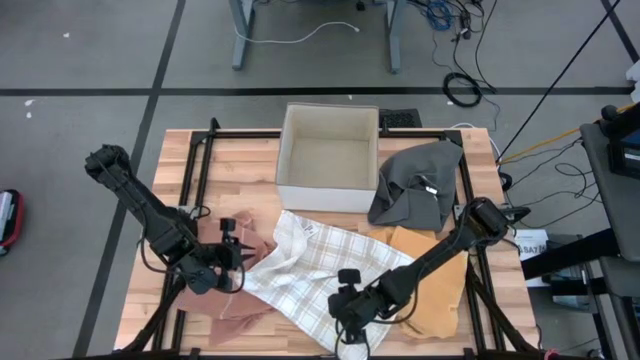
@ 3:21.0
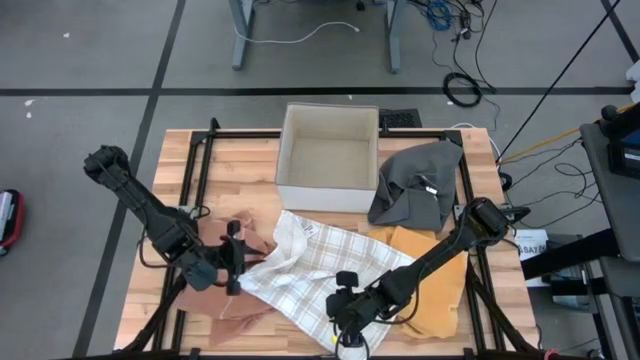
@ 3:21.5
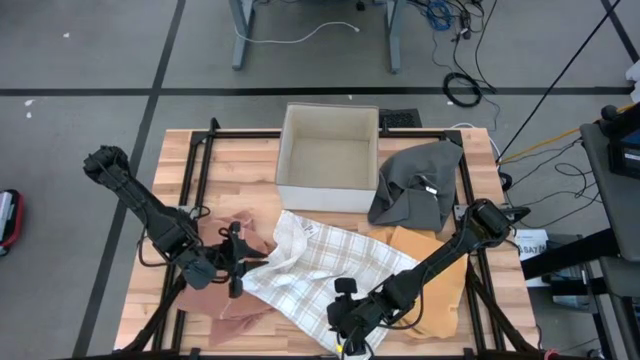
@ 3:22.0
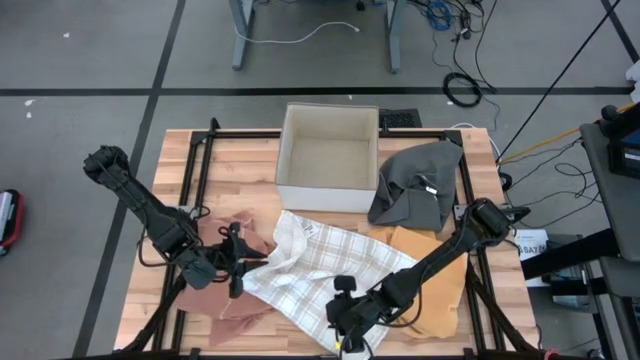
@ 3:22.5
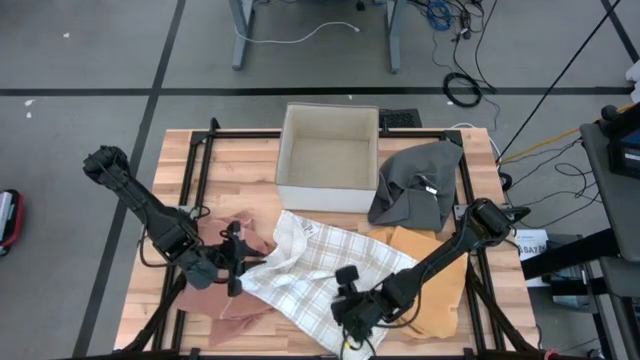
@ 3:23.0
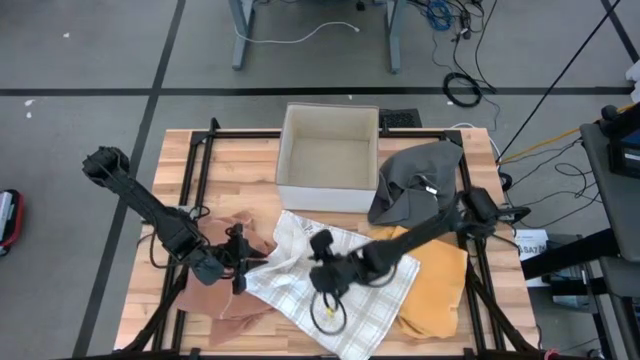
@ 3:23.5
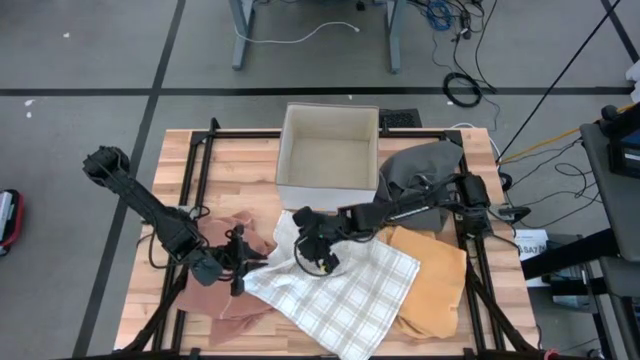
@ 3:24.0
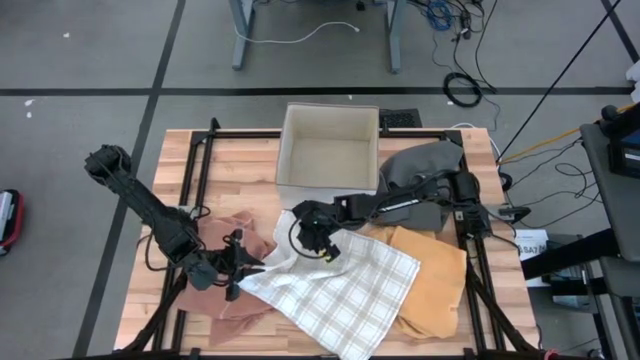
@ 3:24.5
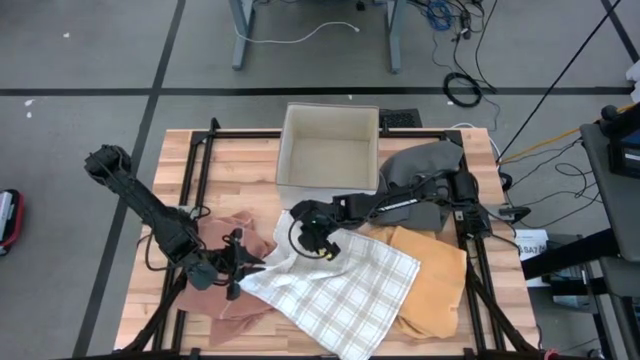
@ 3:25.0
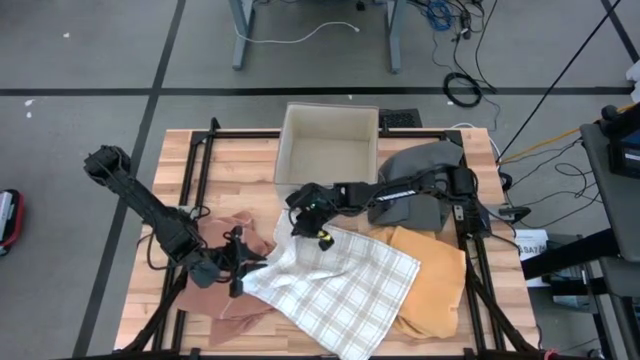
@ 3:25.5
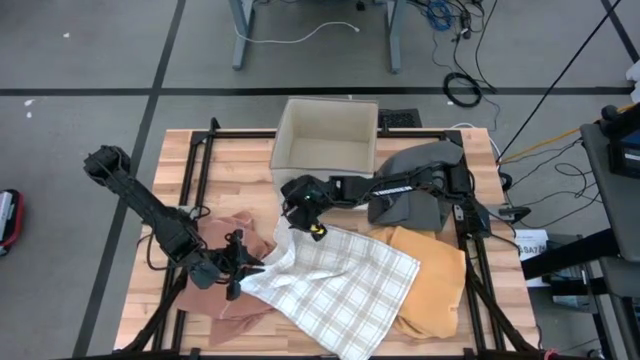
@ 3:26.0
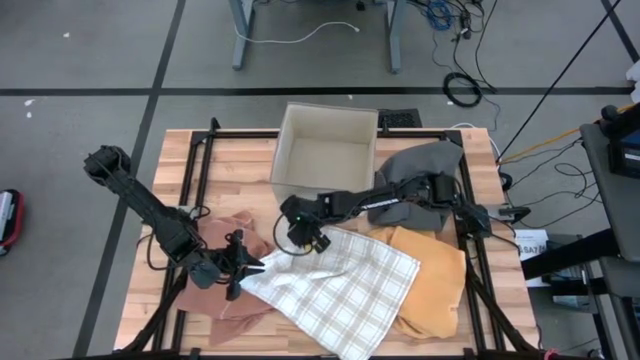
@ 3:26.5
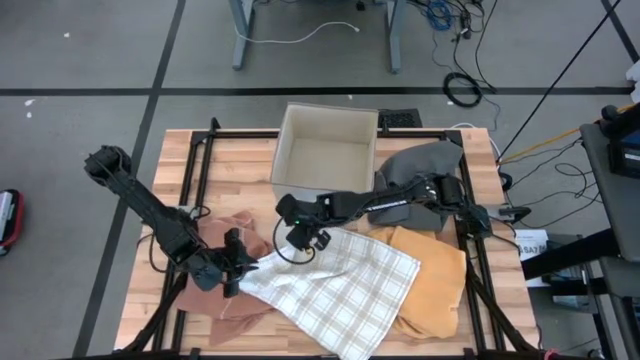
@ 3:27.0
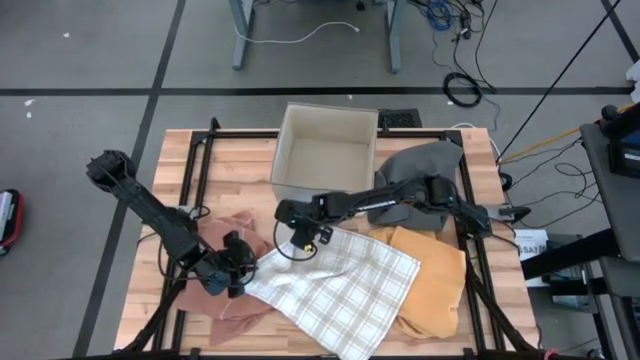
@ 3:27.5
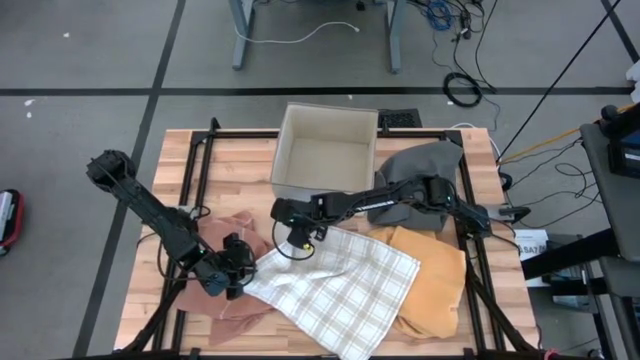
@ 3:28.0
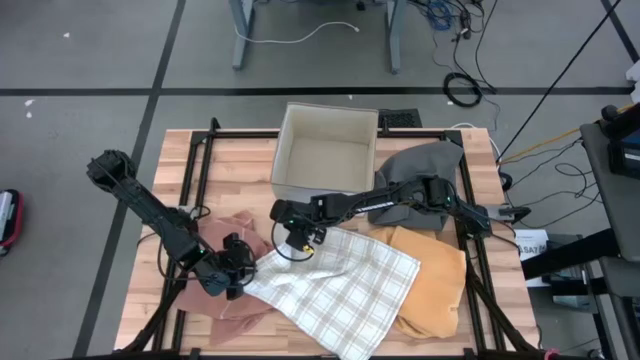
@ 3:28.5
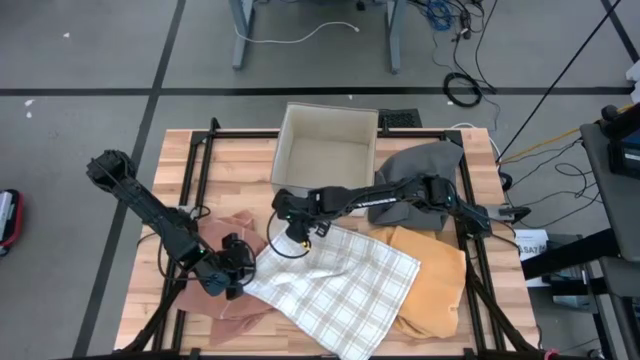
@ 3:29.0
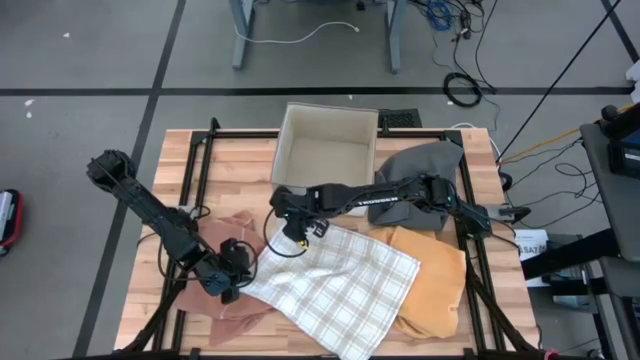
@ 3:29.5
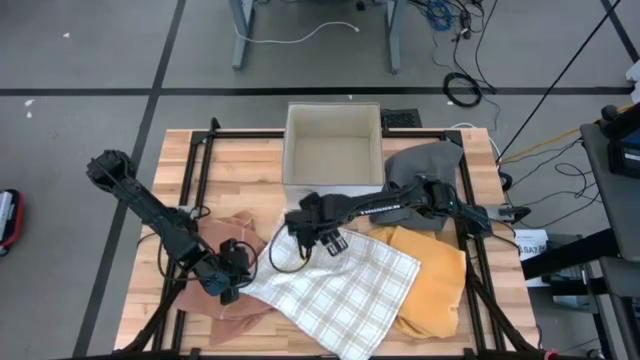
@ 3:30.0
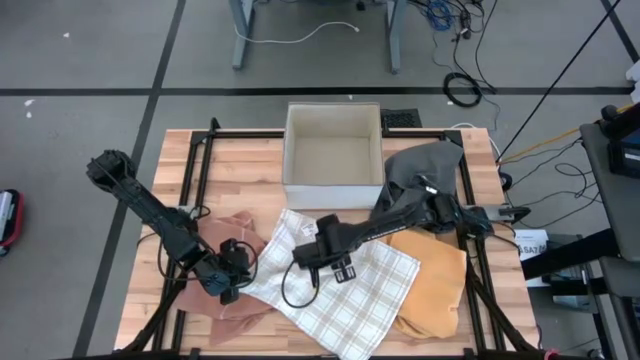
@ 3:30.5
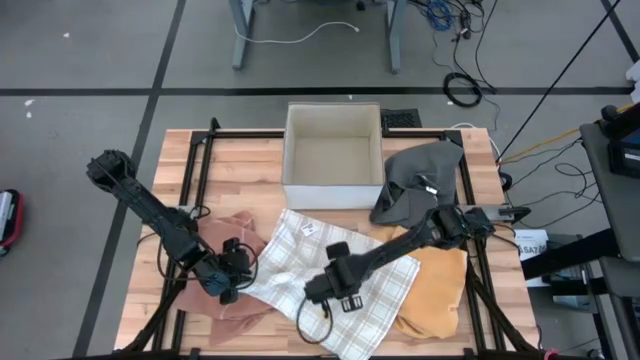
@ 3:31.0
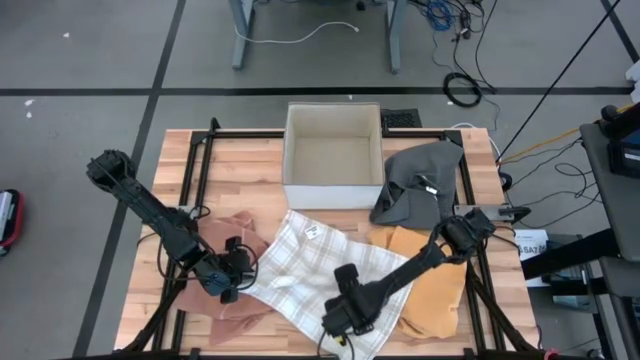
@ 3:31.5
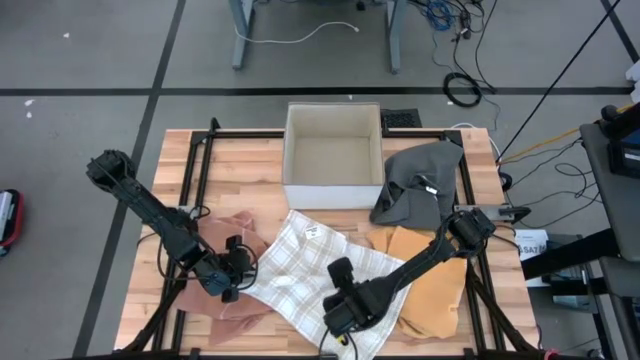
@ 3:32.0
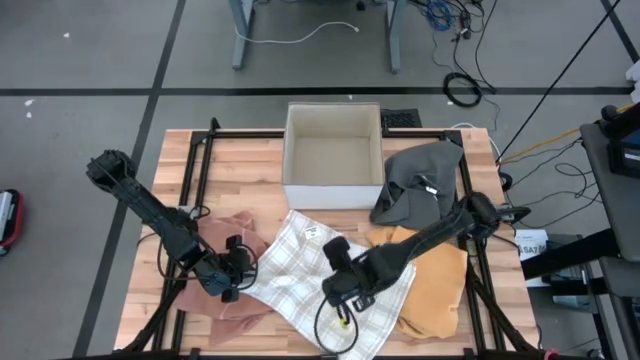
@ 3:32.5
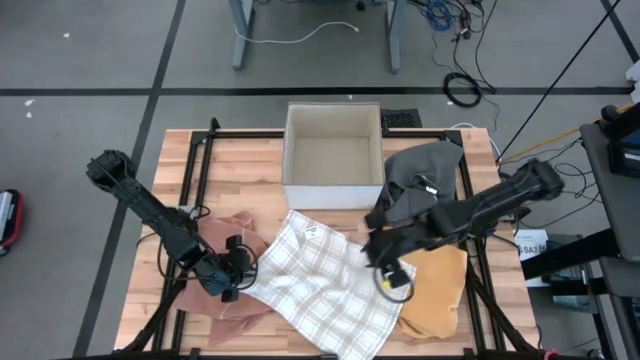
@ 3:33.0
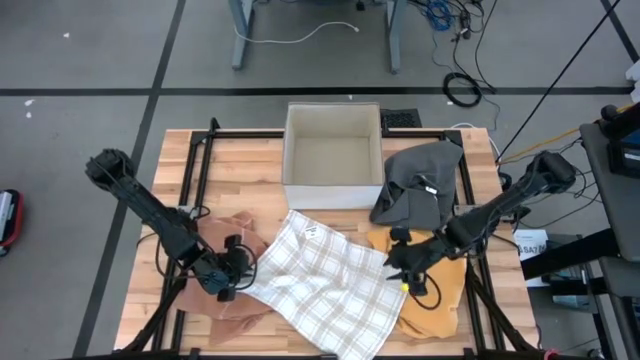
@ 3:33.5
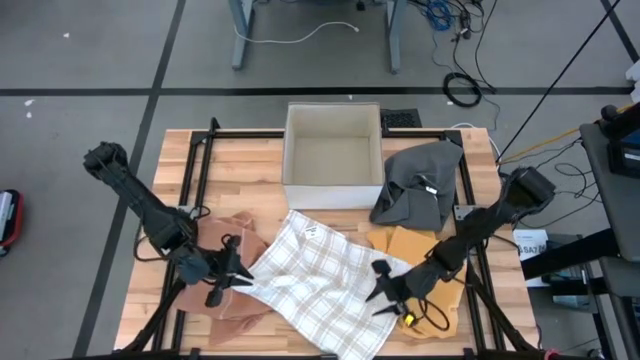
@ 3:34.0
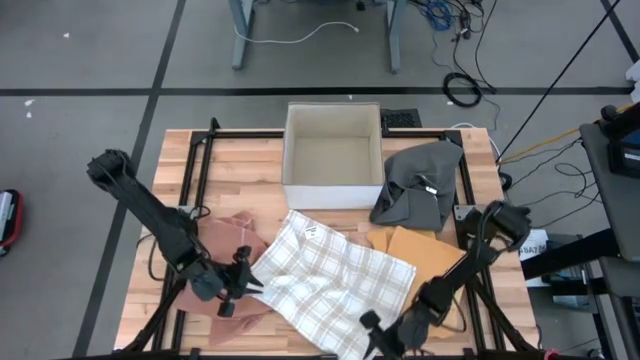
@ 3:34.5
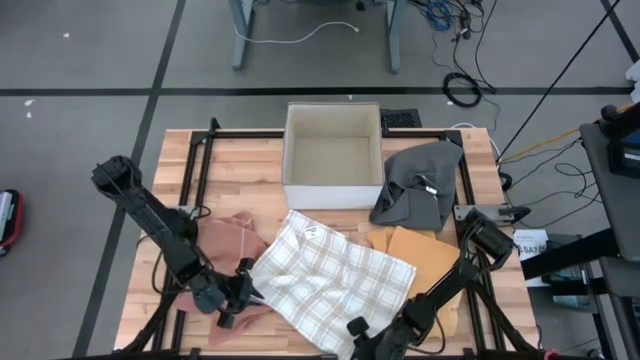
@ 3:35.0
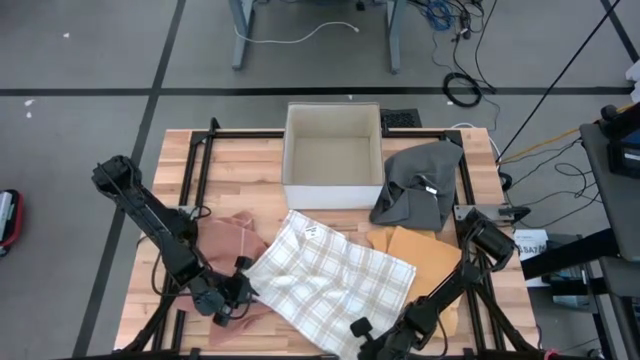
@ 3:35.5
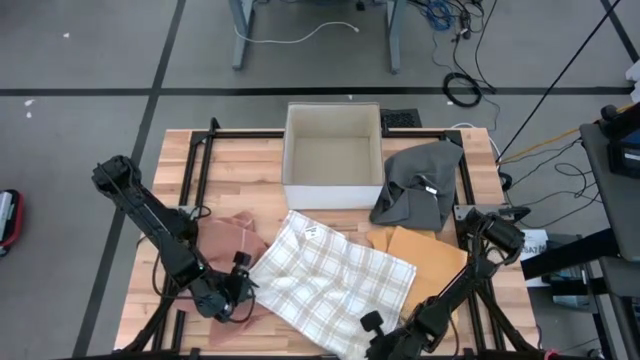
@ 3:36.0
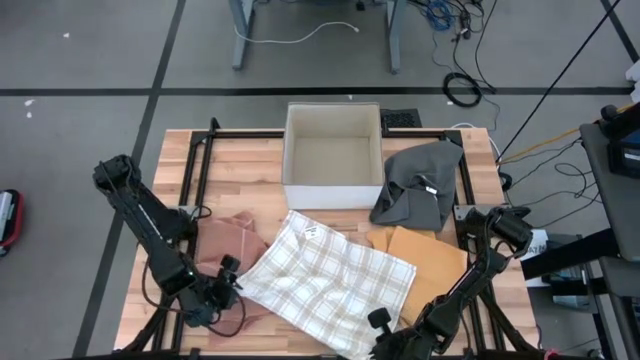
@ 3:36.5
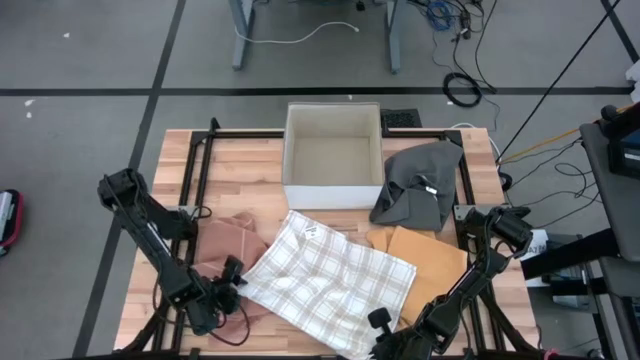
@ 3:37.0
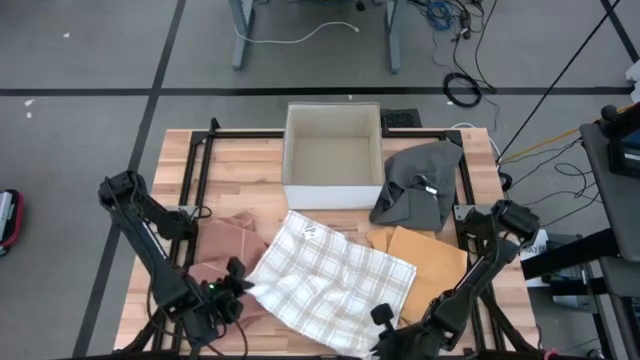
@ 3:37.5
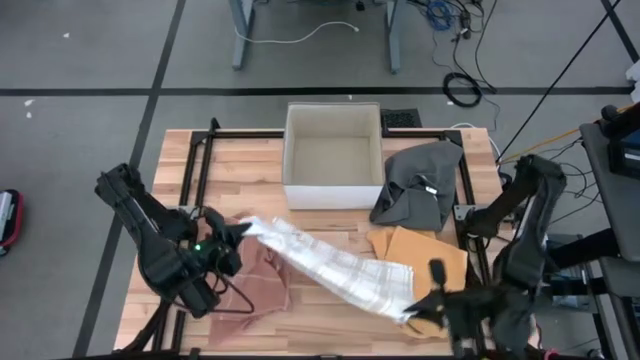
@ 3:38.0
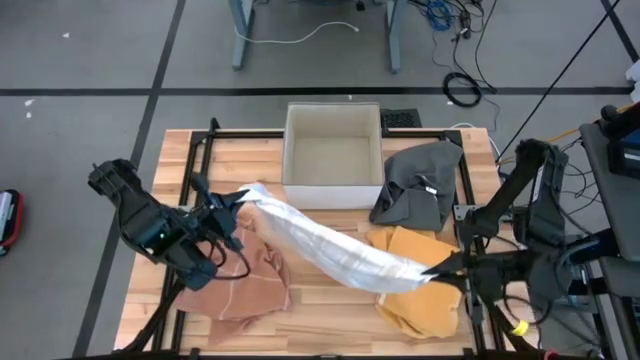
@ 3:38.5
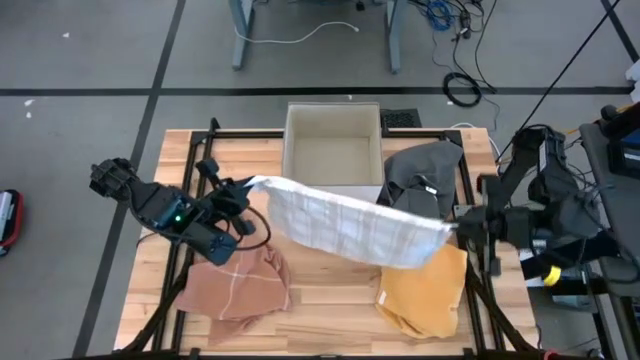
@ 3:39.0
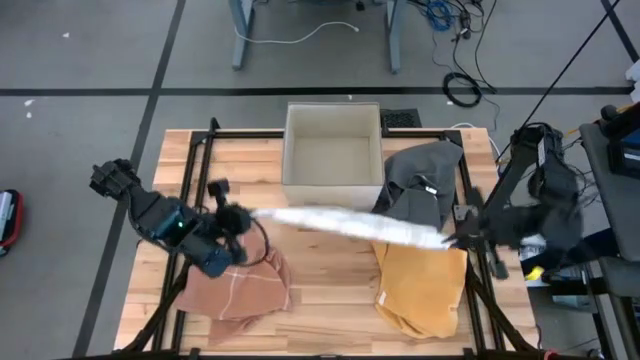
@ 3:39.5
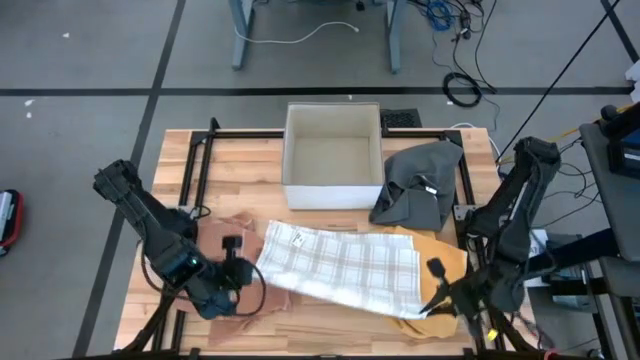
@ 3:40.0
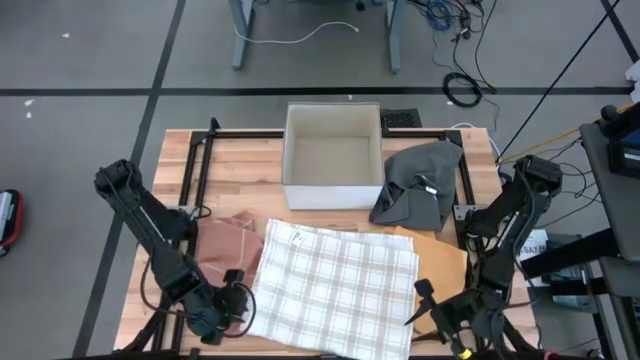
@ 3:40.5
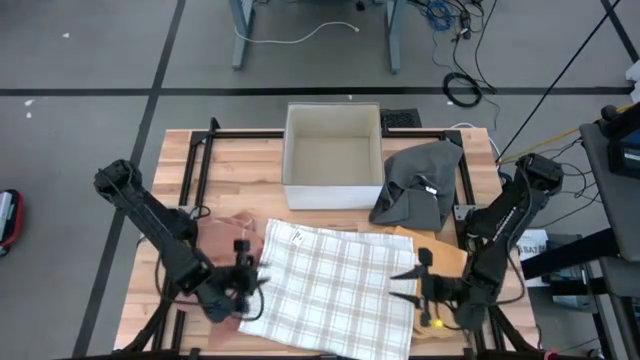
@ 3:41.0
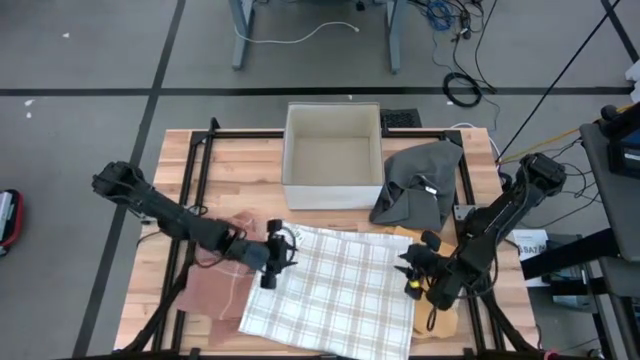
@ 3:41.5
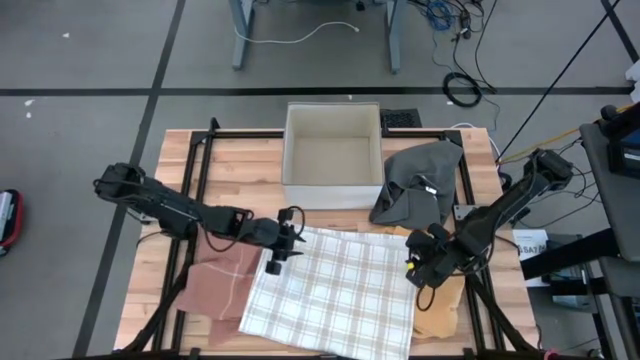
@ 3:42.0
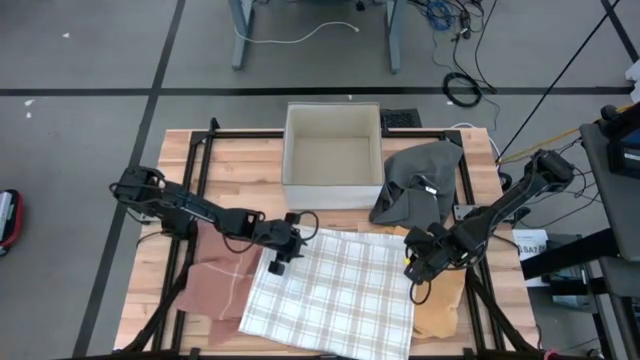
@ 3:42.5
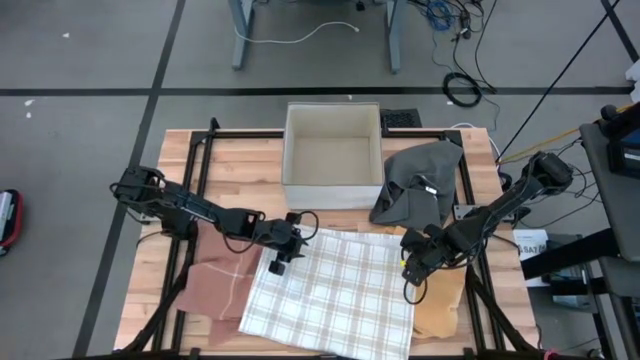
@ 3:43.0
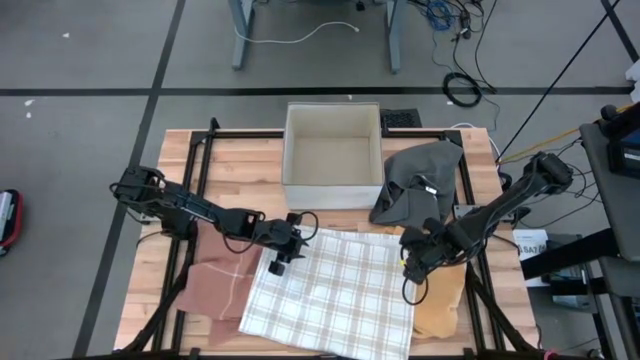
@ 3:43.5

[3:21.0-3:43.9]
Task: Fold towel
Fold the white patterned towel
